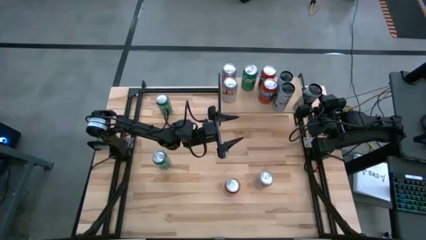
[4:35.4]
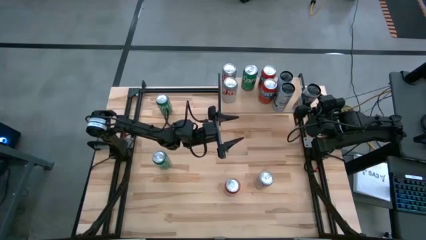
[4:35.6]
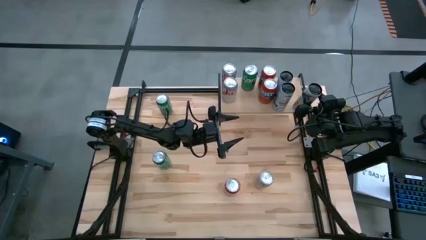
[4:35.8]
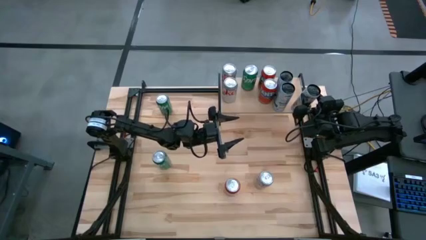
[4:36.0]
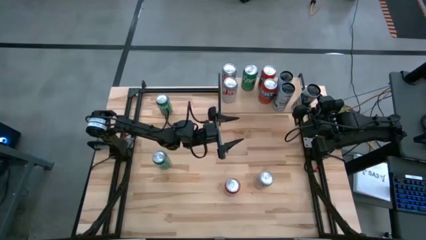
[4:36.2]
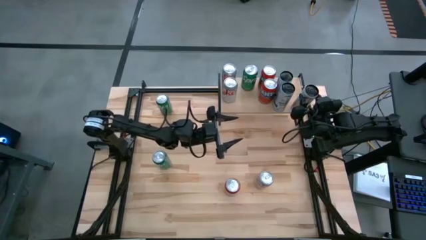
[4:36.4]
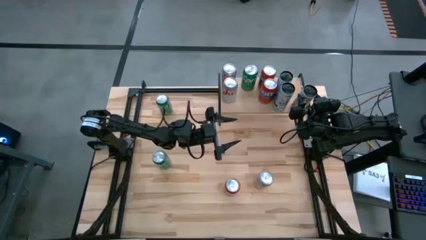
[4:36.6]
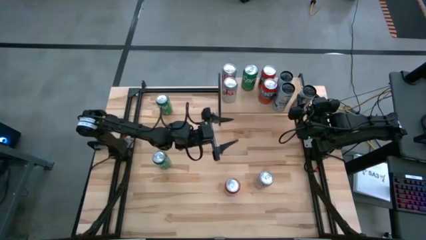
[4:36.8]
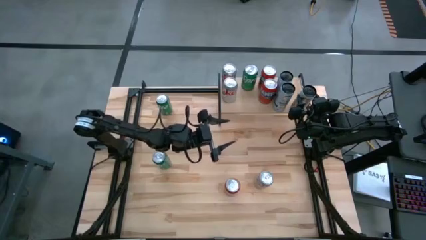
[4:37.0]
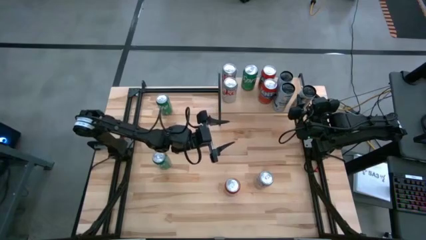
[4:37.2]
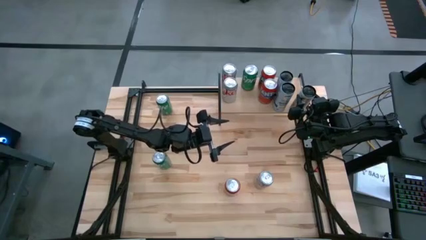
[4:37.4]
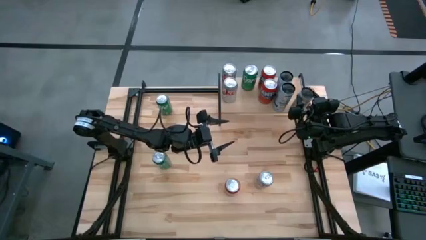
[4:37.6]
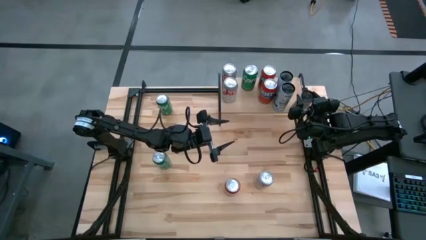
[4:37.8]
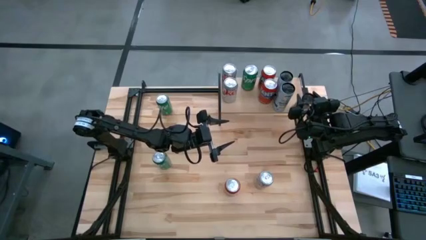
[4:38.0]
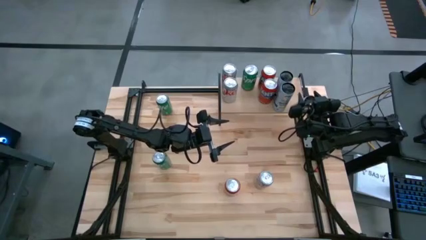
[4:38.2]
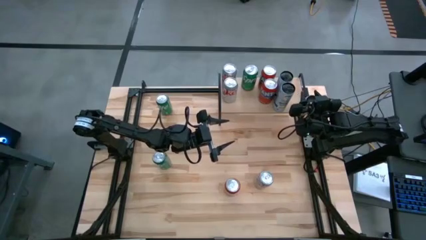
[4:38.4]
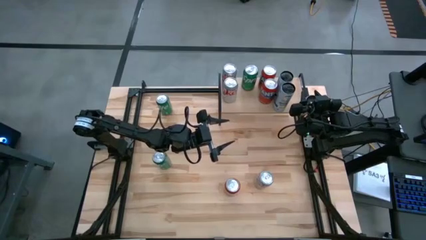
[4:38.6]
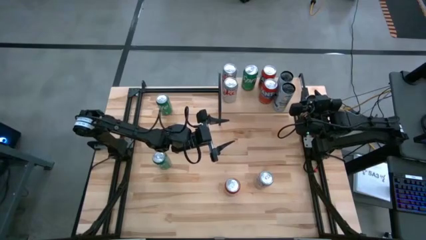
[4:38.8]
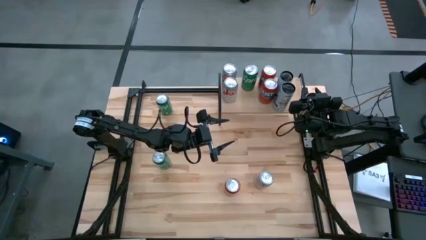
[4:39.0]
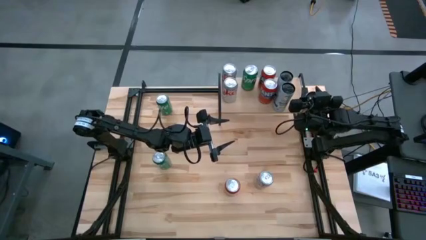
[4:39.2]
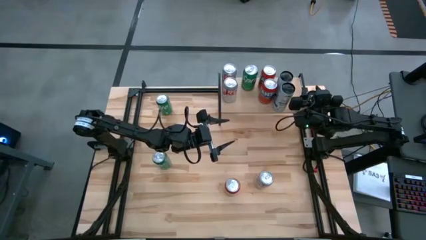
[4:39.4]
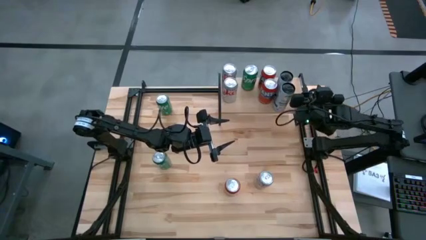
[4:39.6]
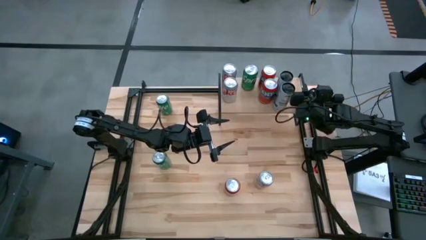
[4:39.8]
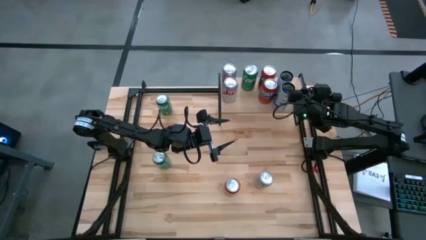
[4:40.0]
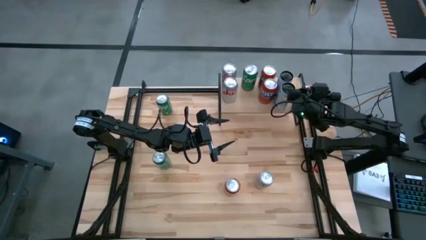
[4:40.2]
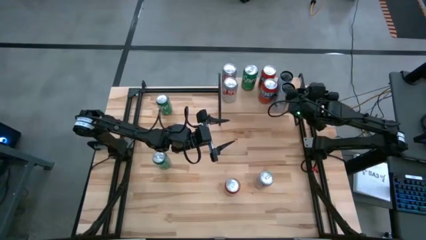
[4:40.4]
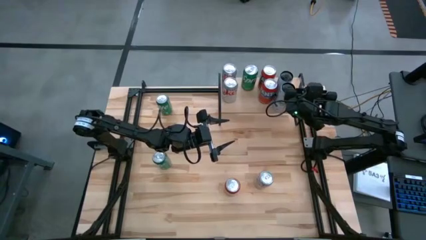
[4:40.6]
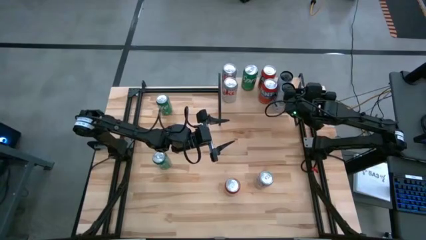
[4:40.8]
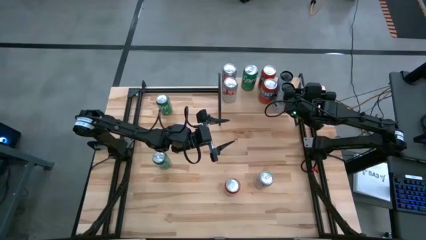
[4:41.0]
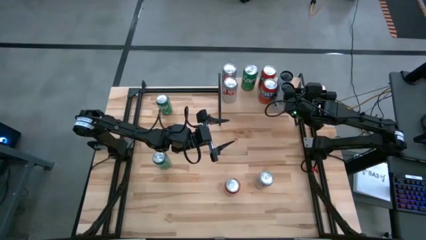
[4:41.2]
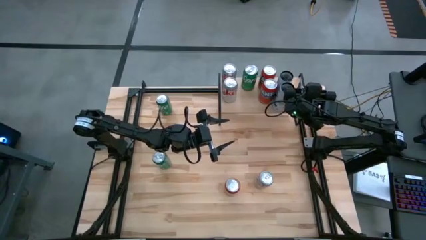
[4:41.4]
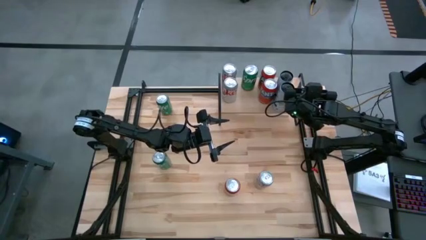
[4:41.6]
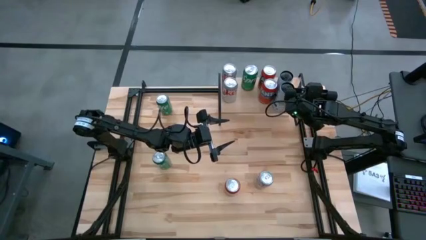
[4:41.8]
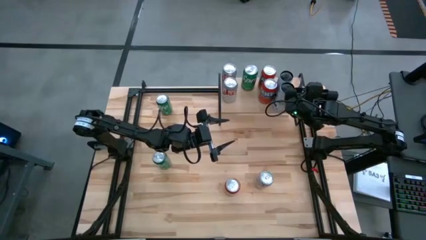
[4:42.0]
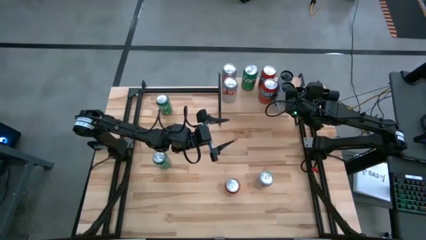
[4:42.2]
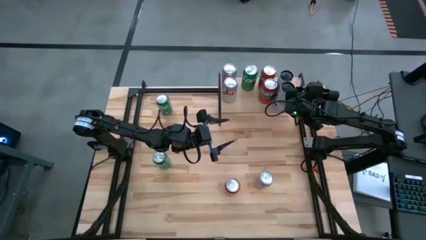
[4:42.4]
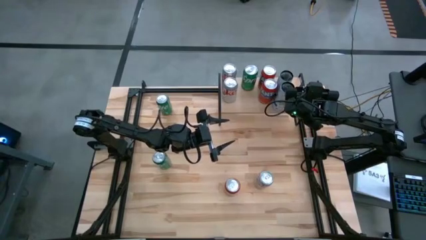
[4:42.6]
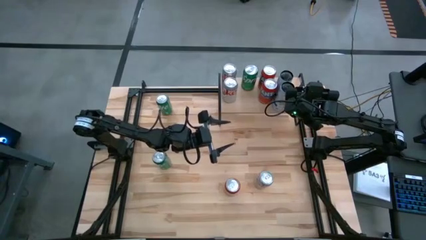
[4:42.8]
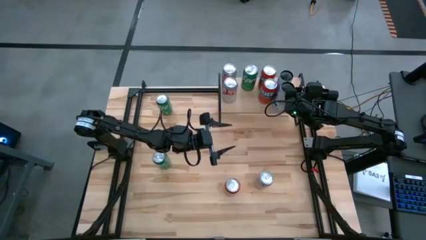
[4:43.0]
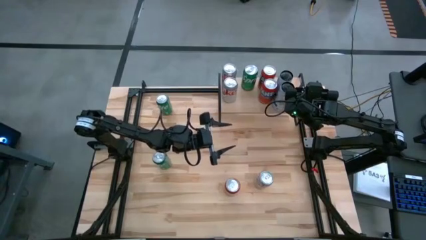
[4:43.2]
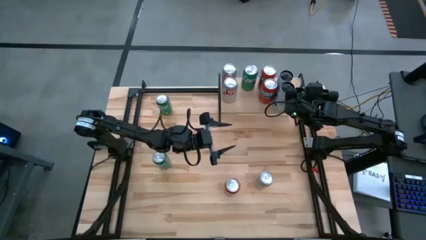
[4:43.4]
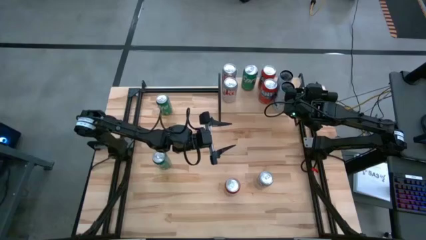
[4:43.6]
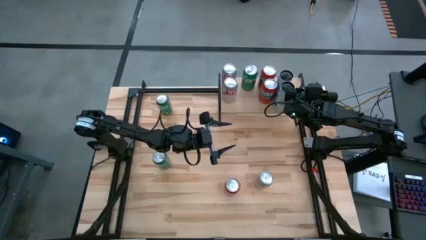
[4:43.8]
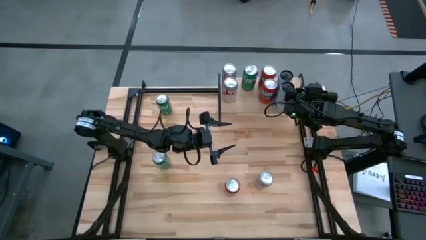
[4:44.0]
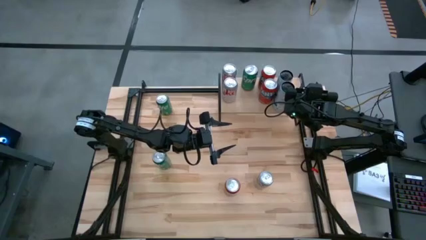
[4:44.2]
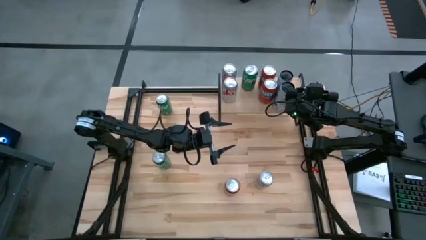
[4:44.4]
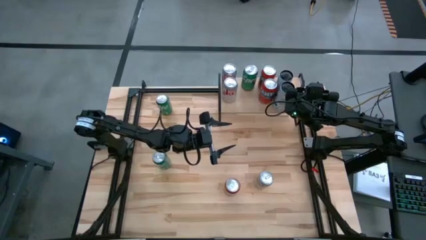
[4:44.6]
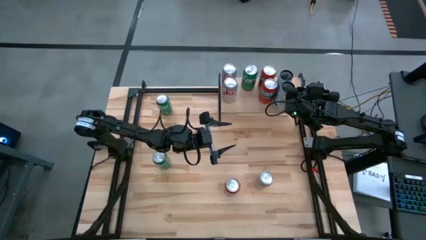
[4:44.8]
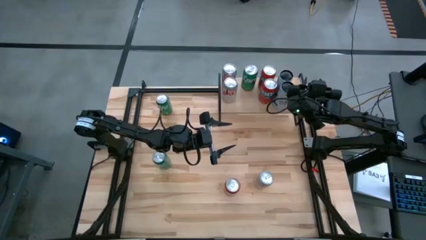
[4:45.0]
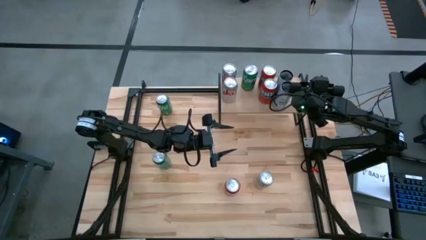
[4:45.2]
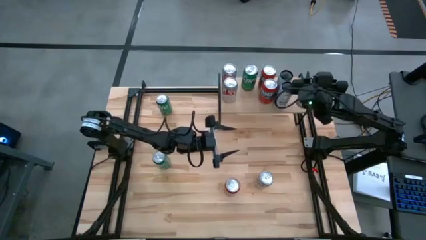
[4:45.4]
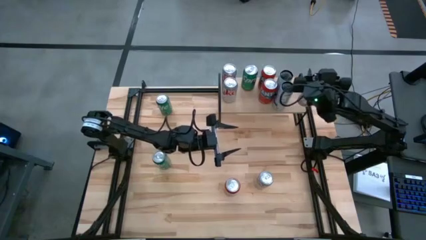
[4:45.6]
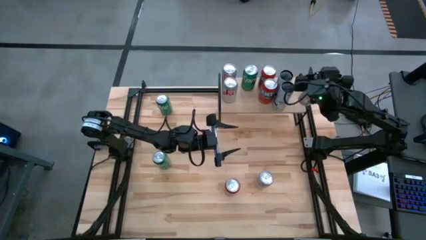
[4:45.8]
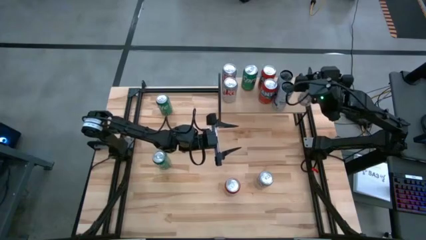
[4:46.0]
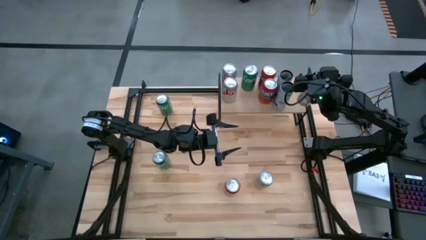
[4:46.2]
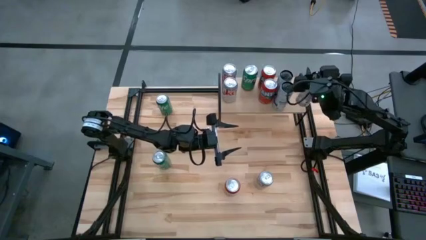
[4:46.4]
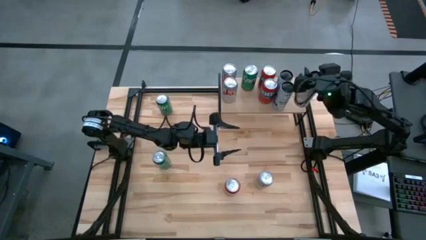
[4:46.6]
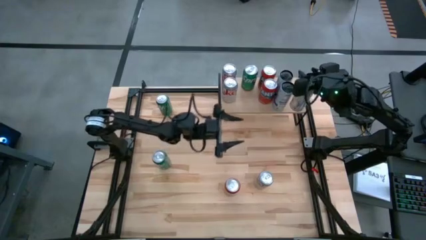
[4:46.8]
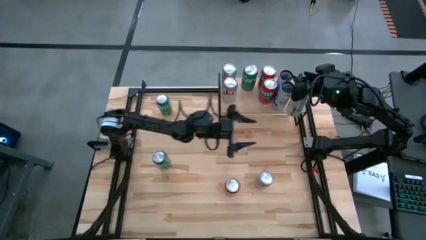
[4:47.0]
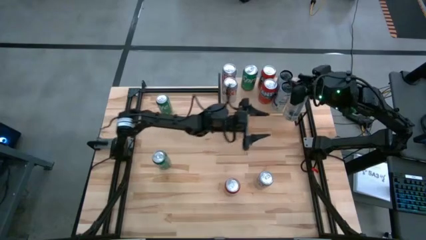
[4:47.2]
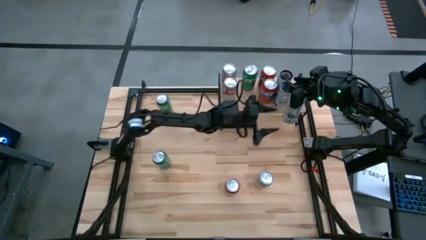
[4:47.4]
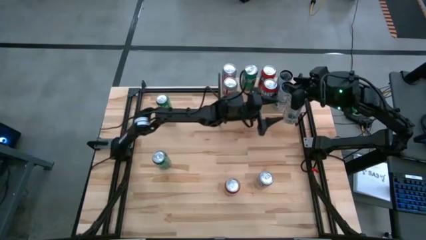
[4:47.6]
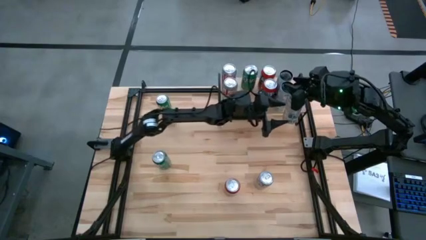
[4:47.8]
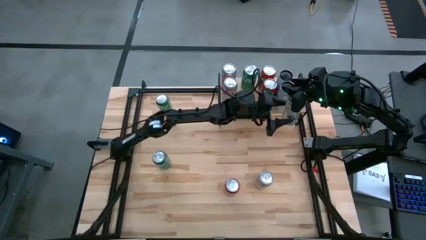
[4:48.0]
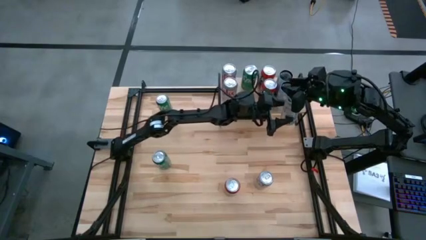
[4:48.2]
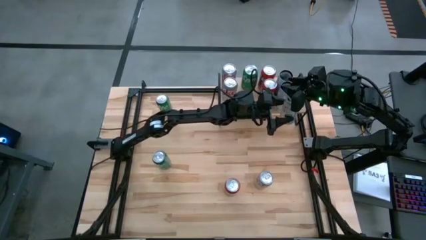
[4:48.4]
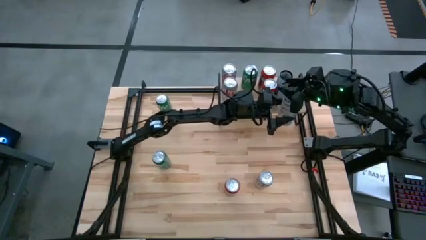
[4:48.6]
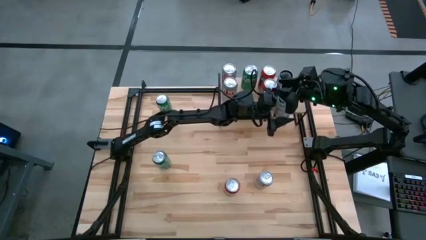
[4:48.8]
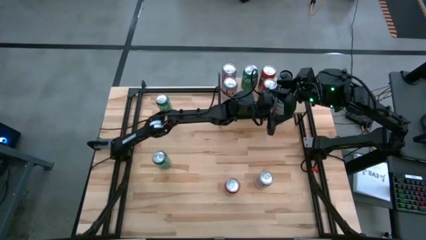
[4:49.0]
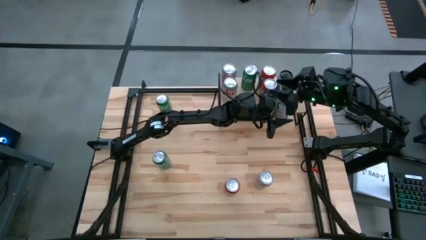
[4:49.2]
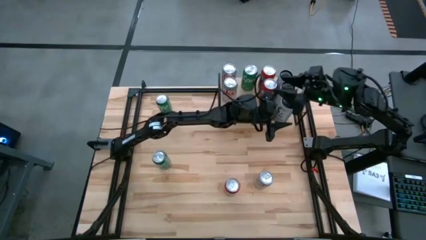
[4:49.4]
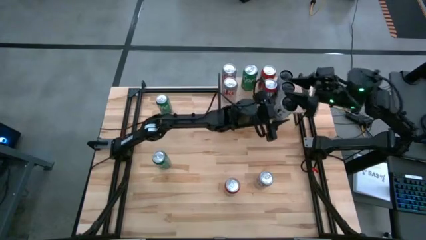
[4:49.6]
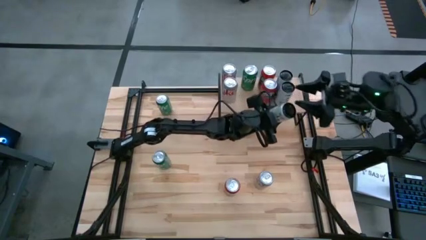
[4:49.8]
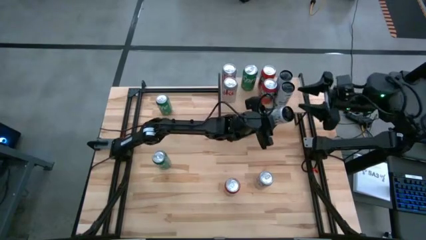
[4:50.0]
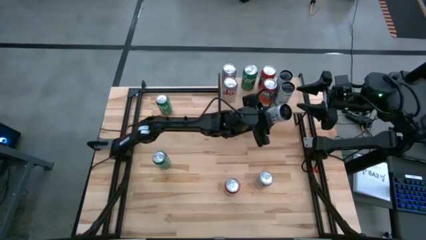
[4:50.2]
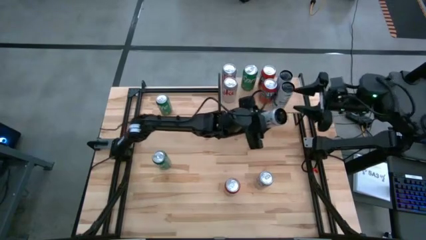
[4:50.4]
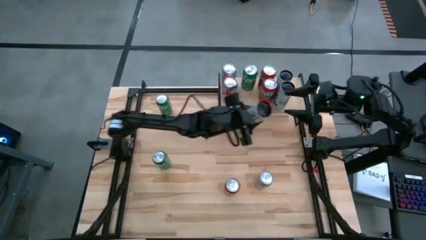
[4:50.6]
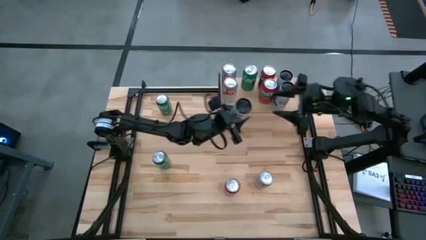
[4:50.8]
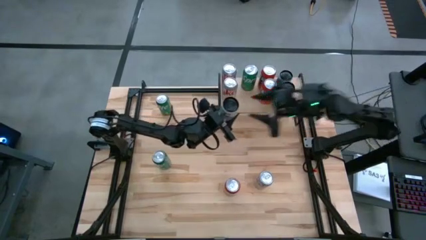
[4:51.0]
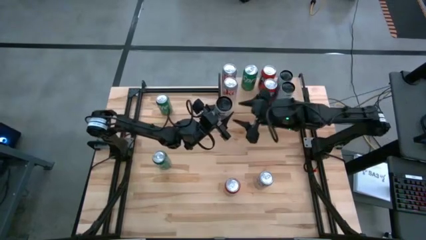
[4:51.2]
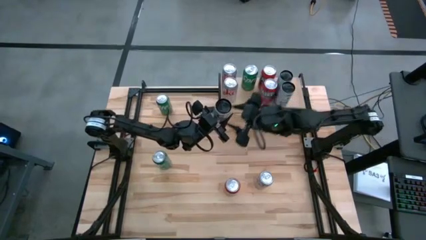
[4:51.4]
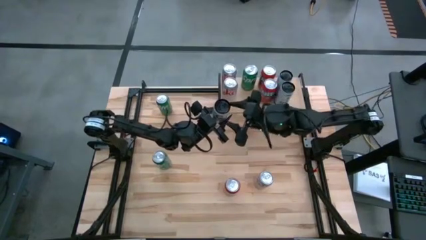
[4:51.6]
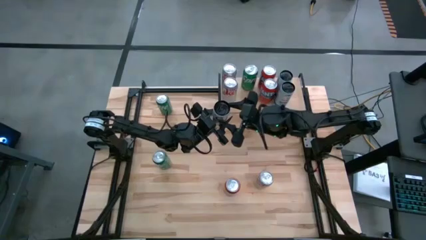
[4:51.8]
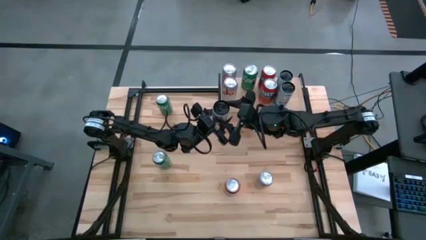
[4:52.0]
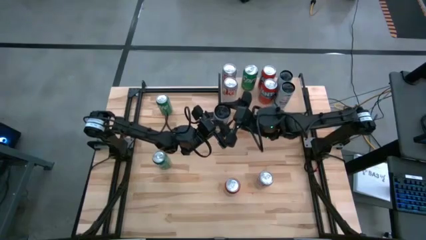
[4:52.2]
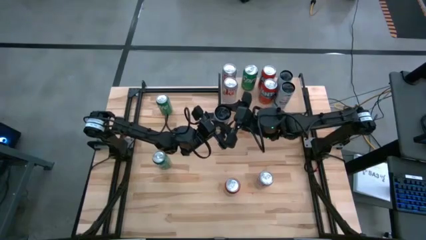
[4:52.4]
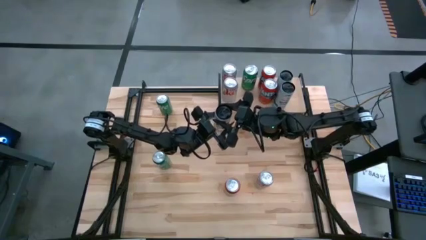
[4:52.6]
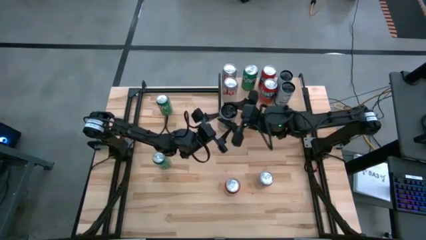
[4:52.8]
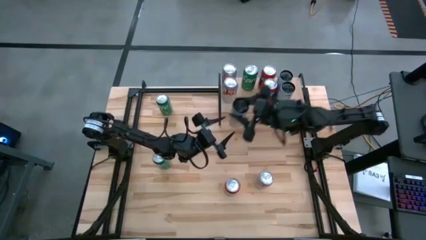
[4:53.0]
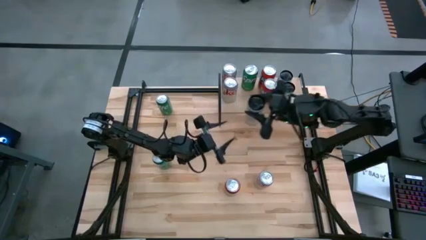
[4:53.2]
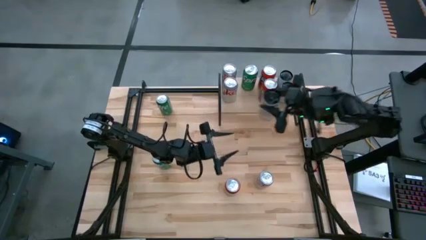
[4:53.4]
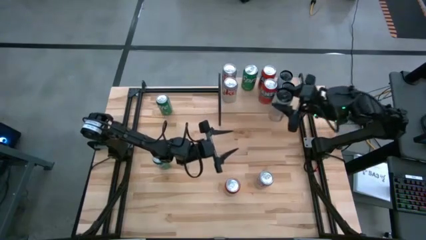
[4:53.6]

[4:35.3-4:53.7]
Task: Place canned beverage on shelf
Put the white soda can on the shelf aligned to the right of the other silver soda cans
